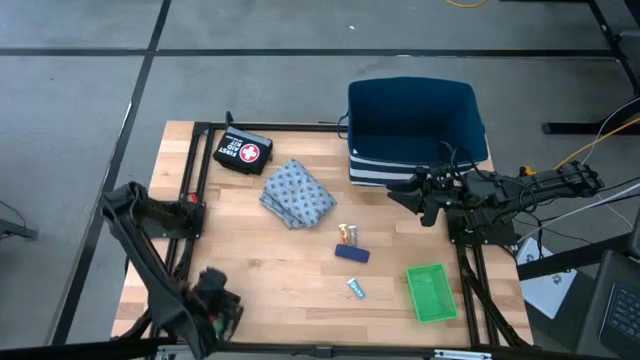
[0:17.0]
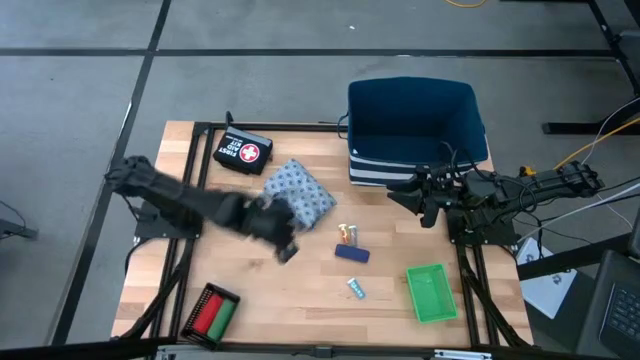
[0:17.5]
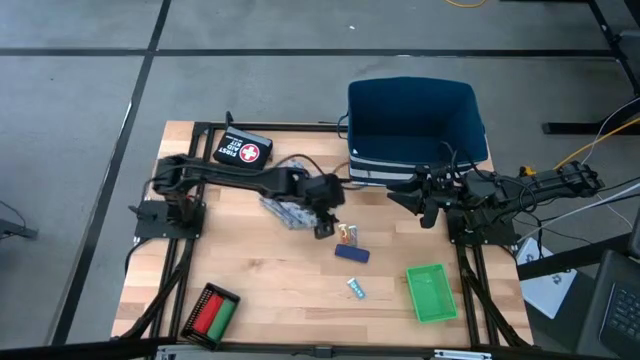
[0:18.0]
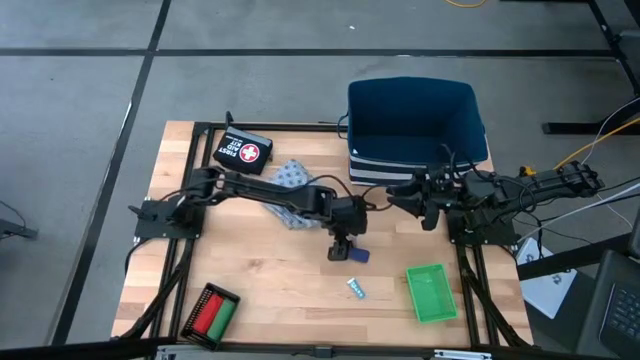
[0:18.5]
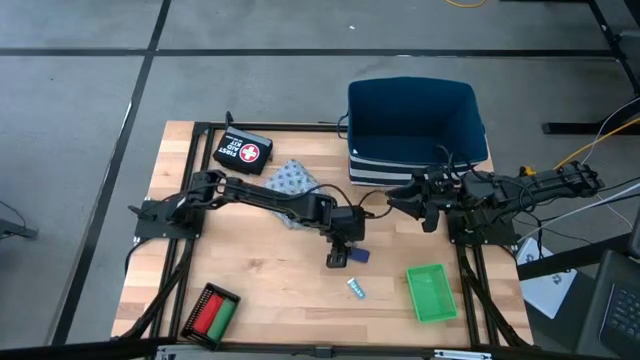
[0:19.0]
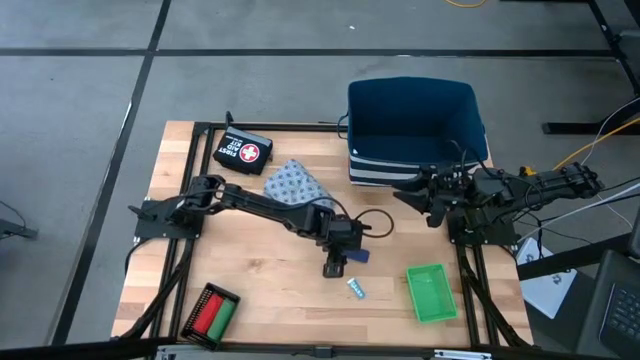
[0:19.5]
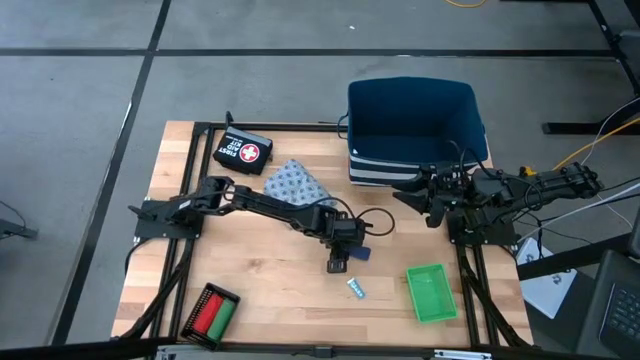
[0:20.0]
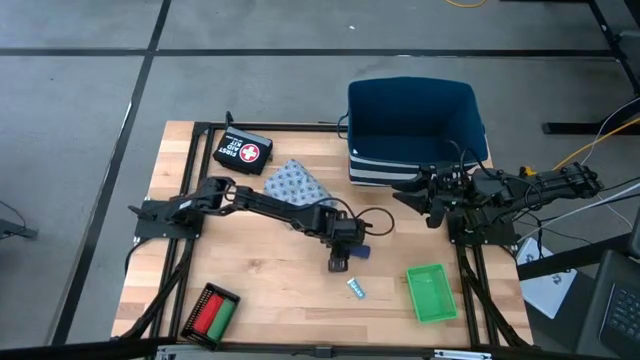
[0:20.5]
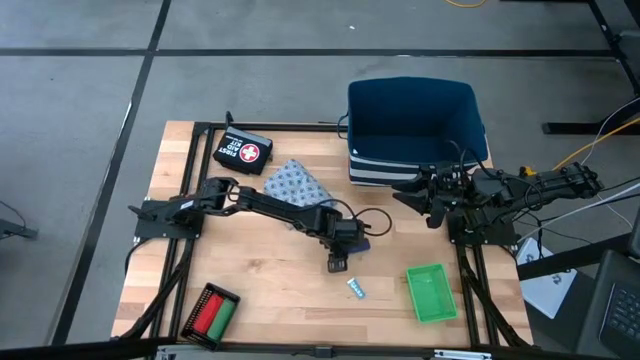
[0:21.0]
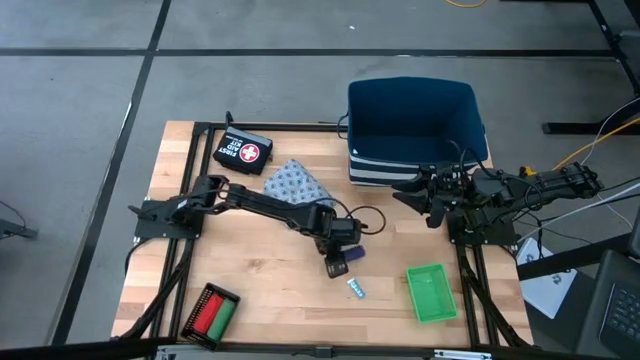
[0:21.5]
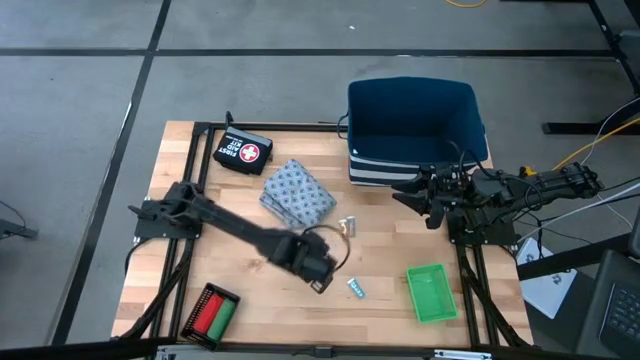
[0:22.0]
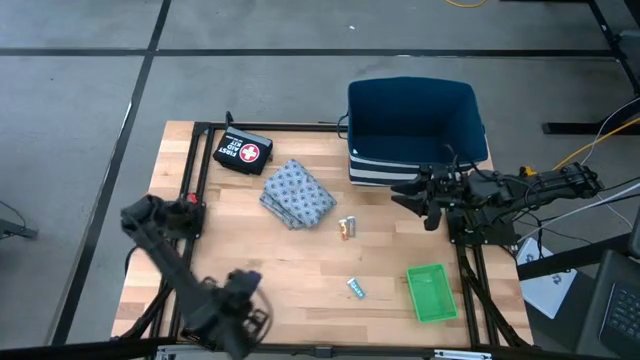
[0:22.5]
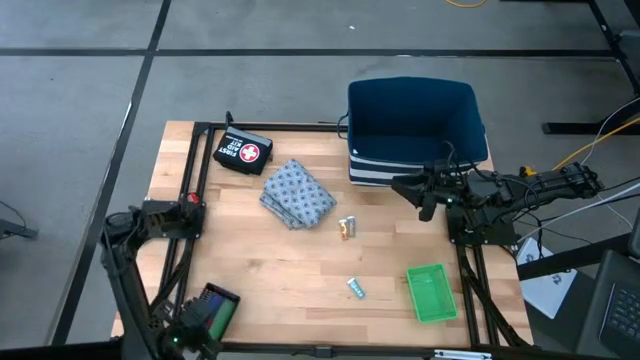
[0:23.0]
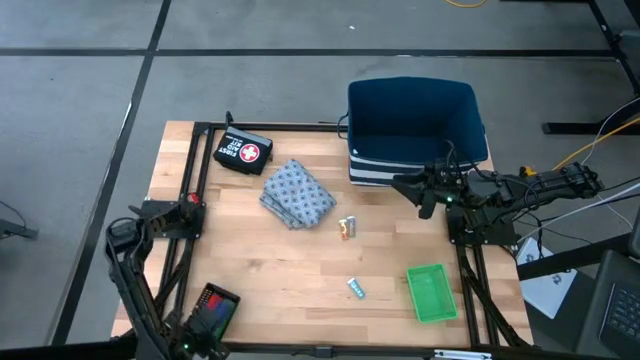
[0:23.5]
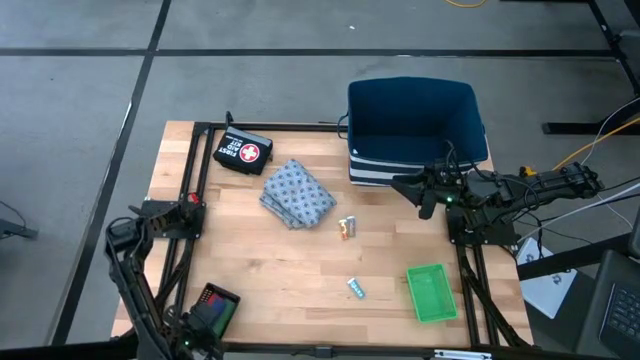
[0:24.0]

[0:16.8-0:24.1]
Task: Pick & place medical supplies in basket/bin
Put the blue bandage into the black bin

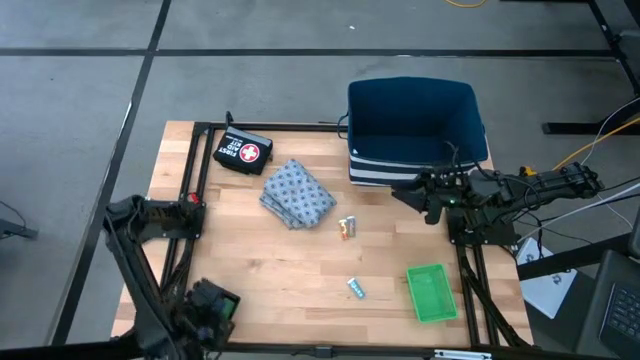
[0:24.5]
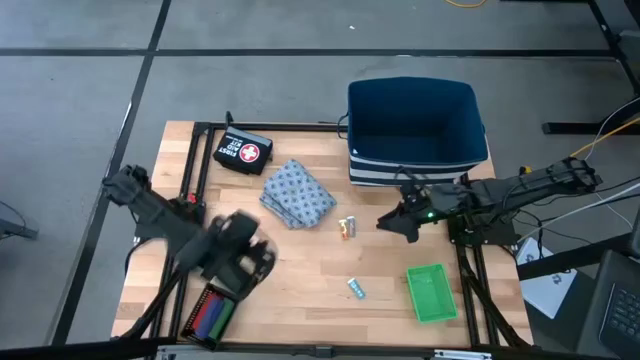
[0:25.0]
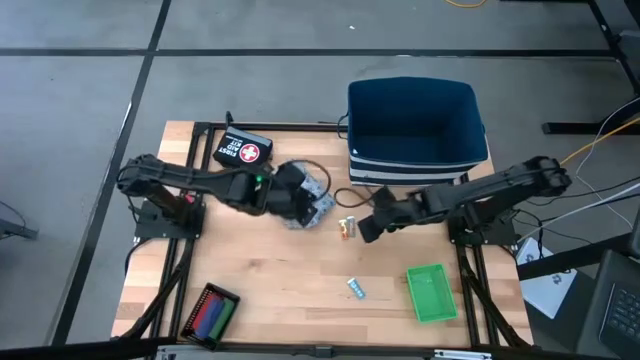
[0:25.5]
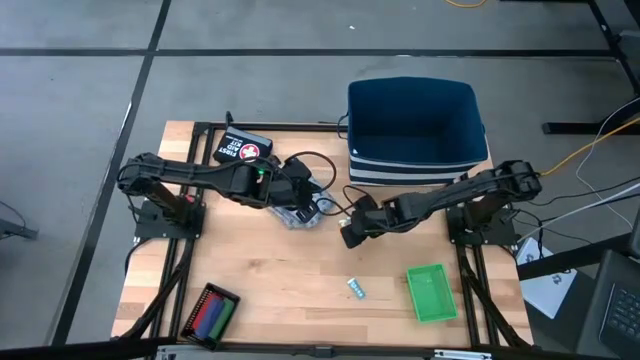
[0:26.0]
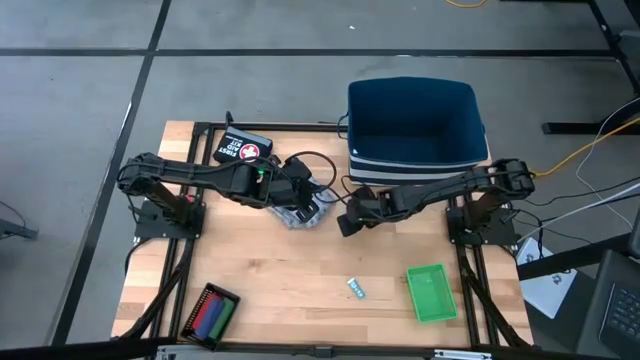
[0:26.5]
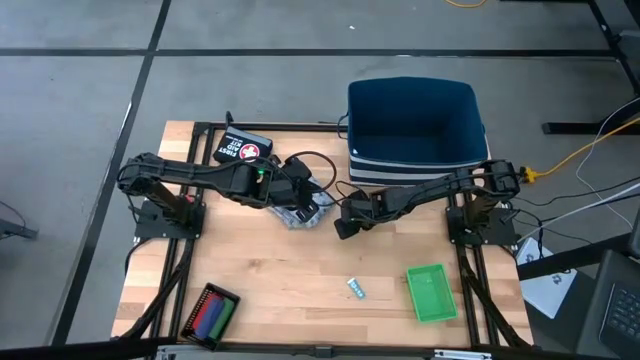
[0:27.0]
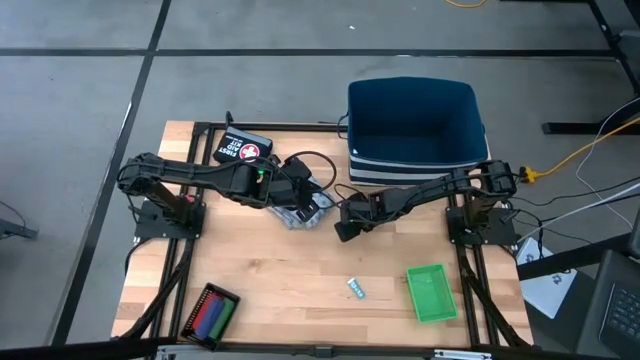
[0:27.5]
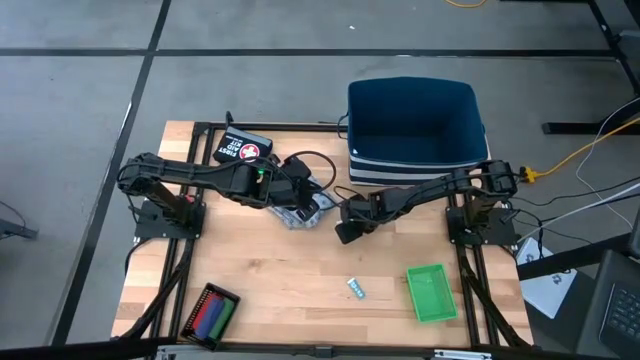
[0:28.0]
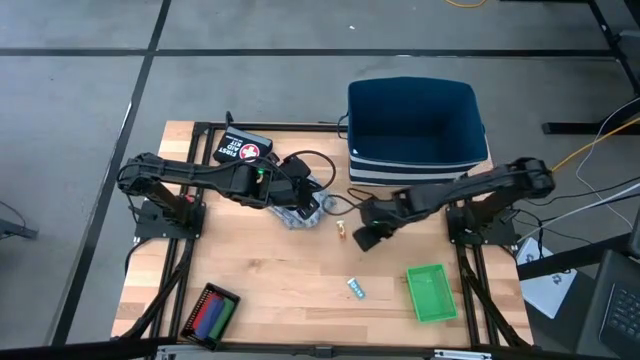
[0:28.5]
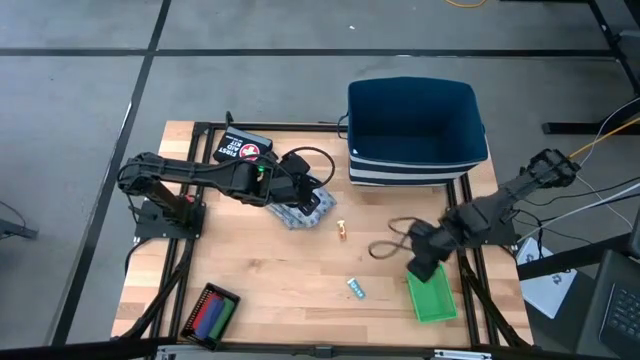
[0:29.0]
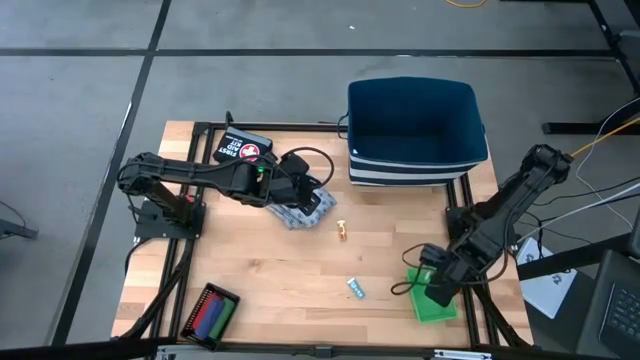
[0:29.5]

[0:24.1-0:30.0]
Put the top blue pill bottle into the green bin

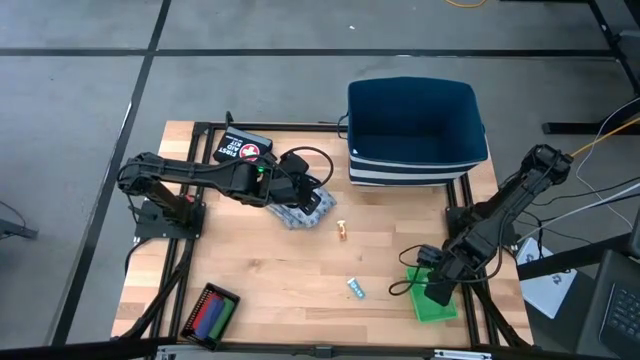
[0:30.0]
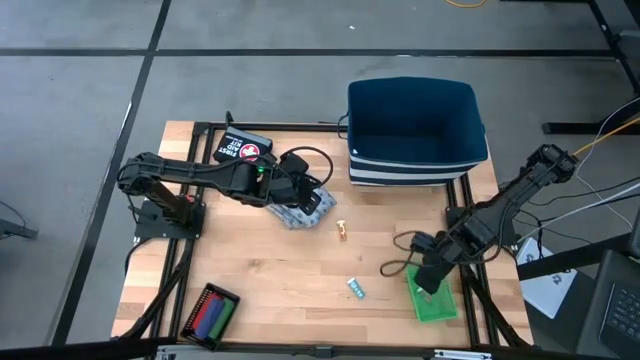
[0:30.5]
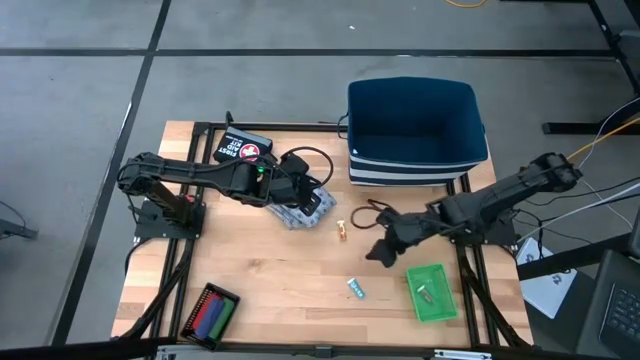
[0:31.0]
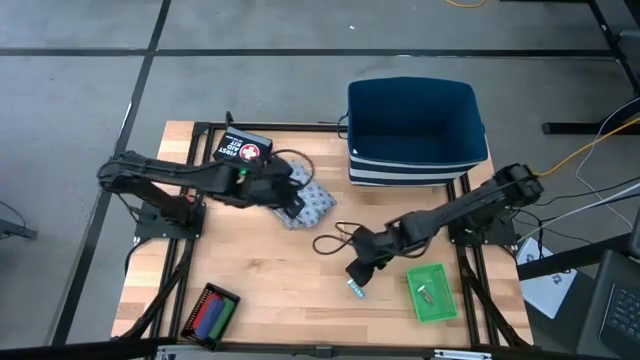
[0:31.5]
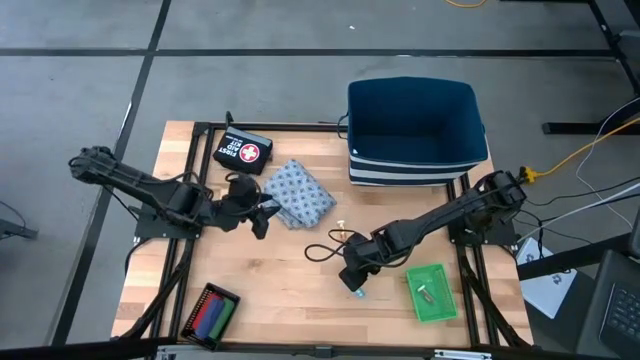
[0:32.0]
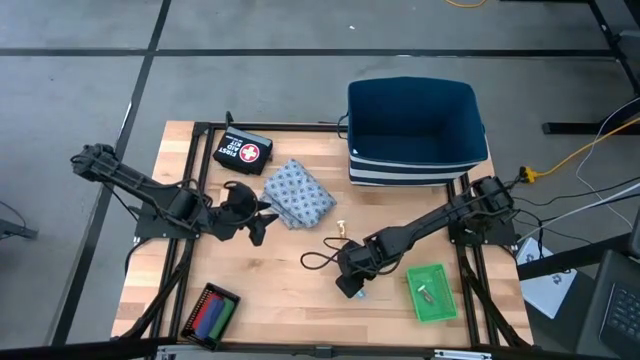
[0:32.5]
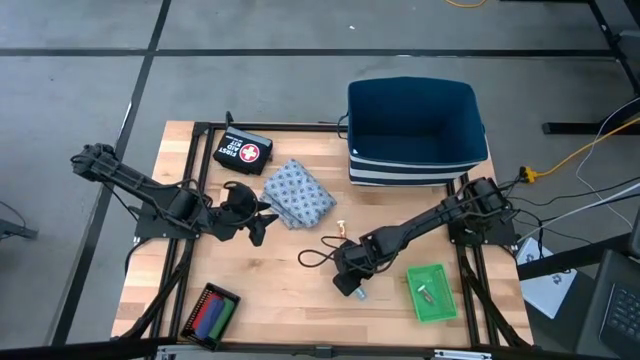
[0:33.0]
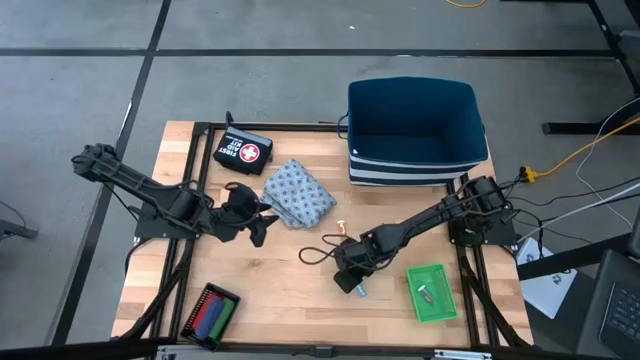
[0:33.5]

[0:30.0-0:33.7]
Put the blue pill bottle into the green bin

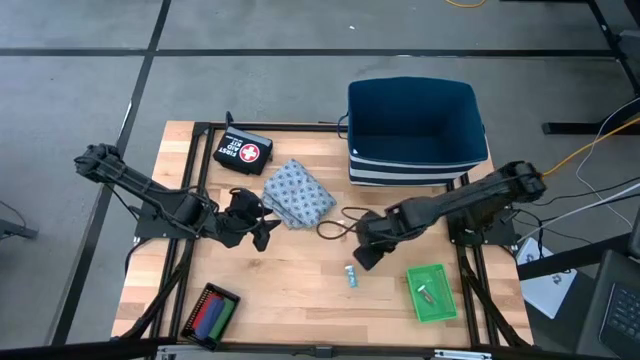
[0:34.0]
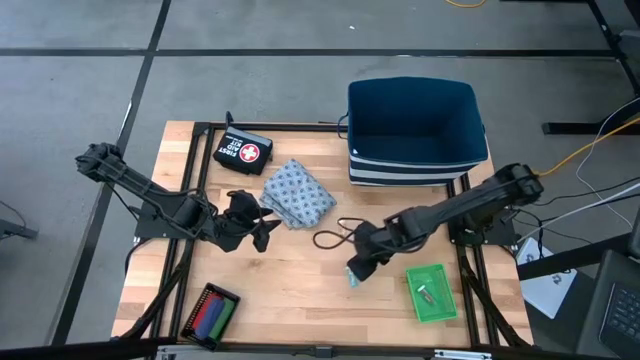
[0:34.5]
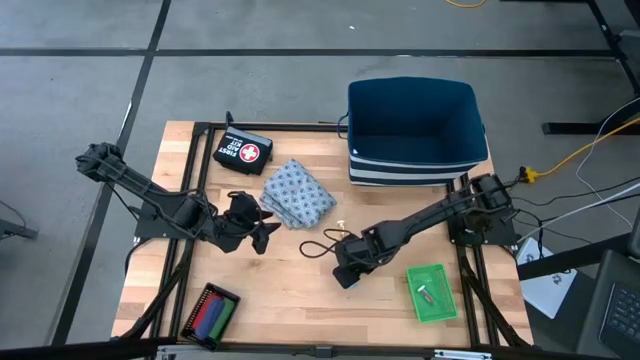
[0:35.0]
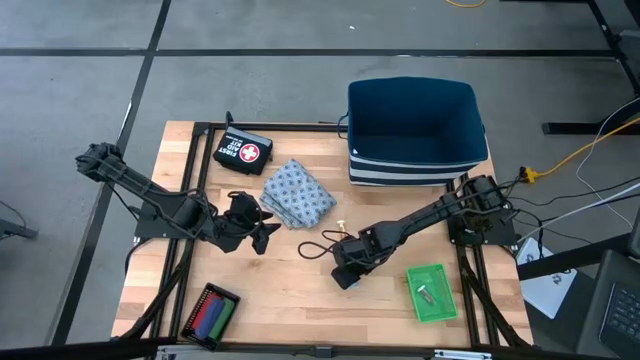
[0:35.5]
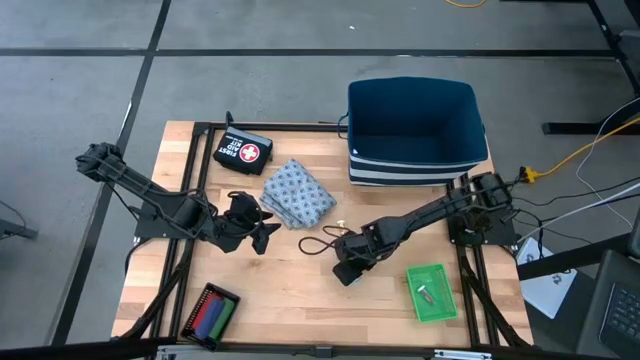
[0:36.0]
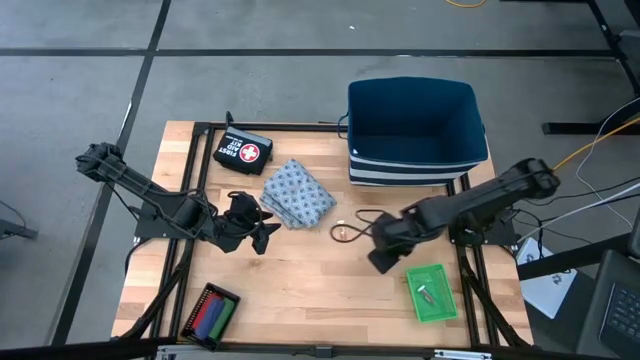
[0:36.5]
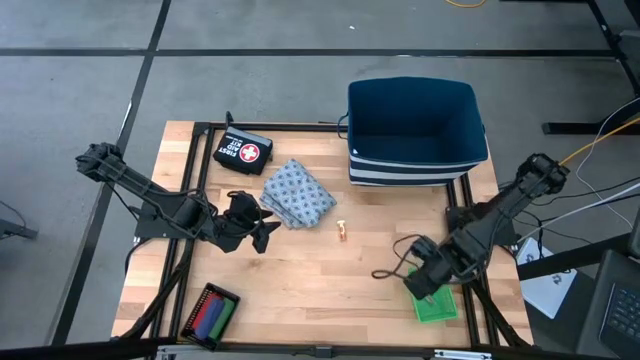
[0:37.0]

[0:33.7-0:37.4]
Put the blue pill bottle into the green bin
